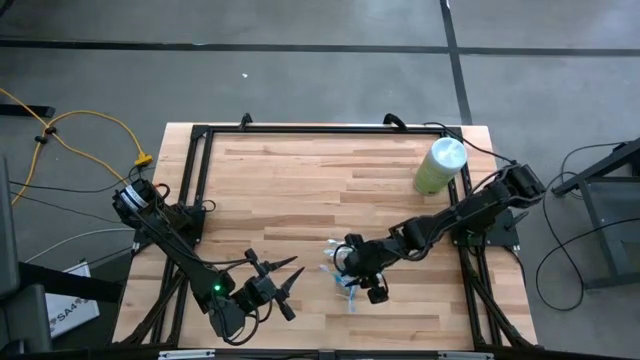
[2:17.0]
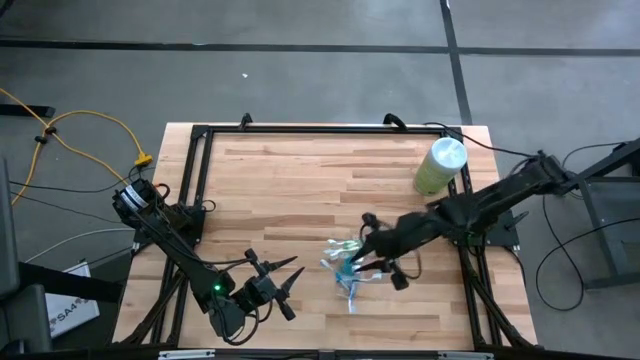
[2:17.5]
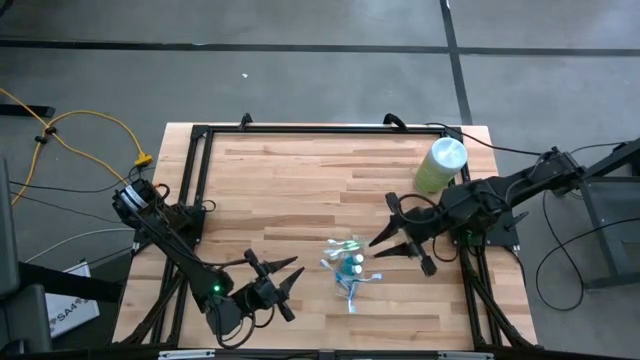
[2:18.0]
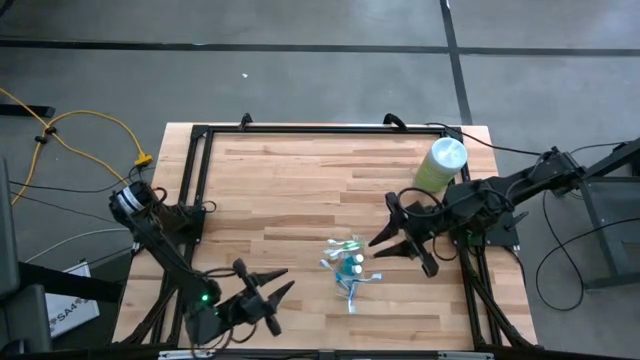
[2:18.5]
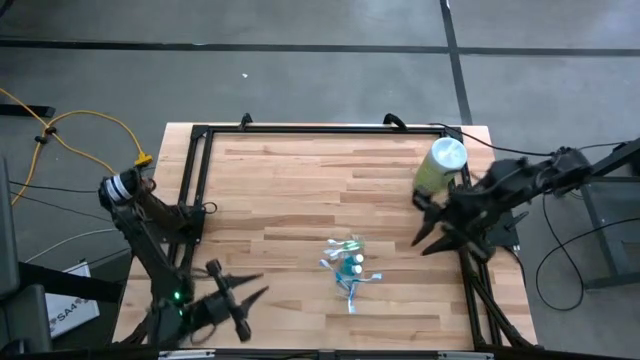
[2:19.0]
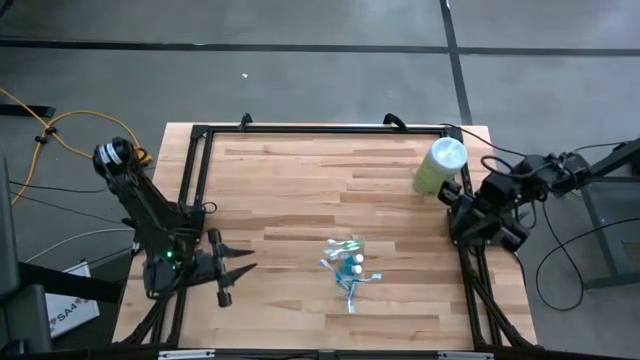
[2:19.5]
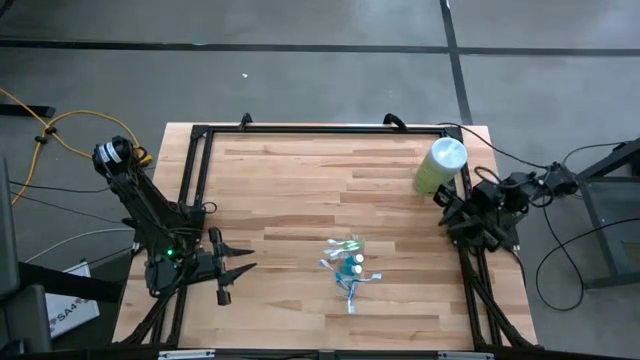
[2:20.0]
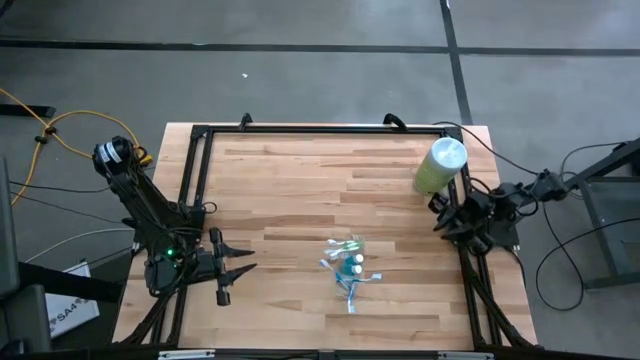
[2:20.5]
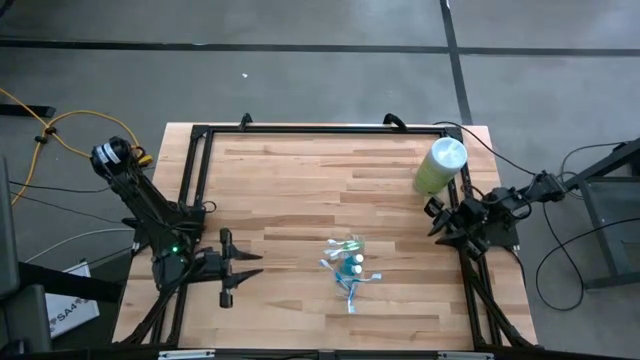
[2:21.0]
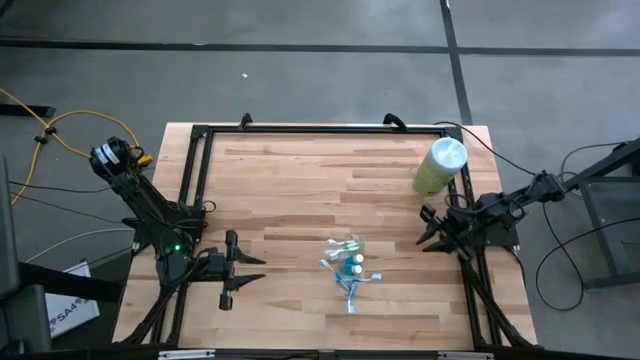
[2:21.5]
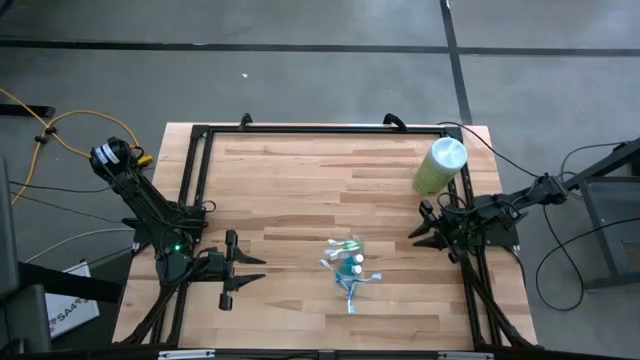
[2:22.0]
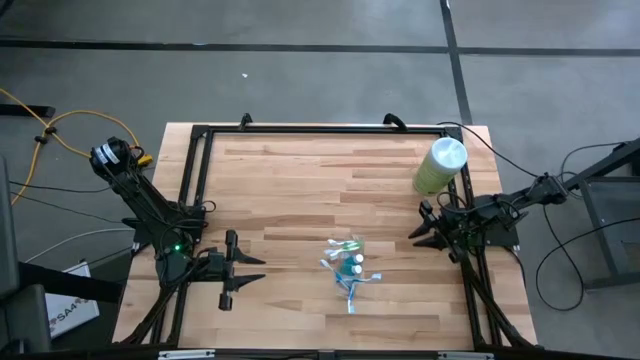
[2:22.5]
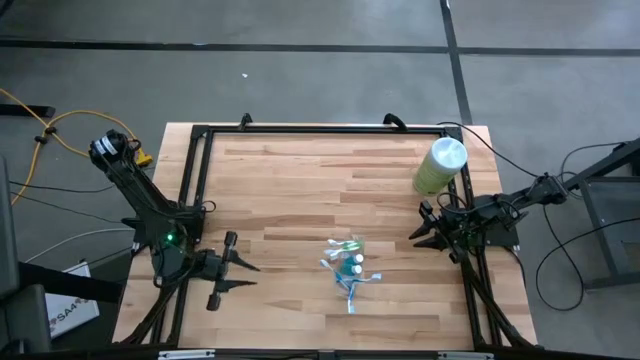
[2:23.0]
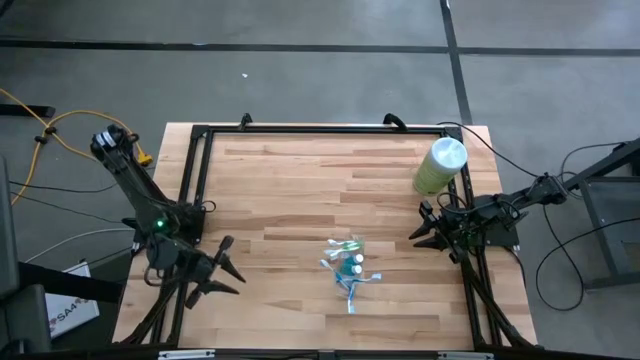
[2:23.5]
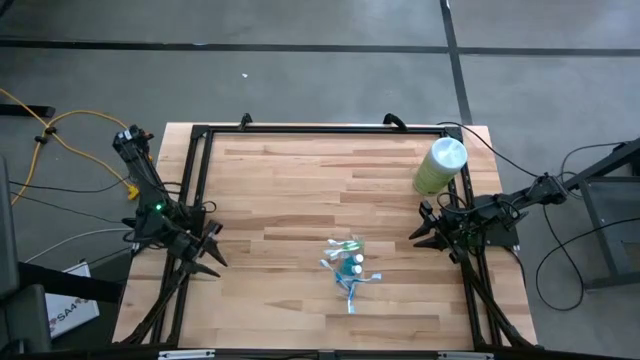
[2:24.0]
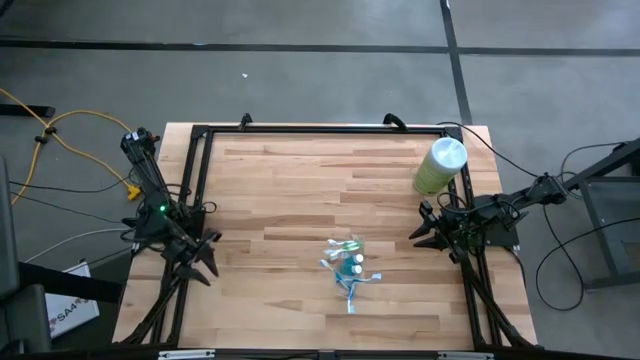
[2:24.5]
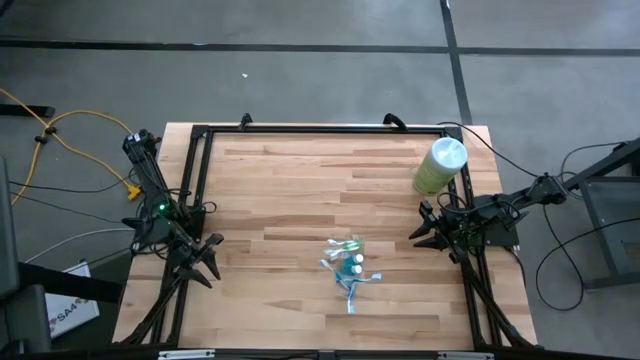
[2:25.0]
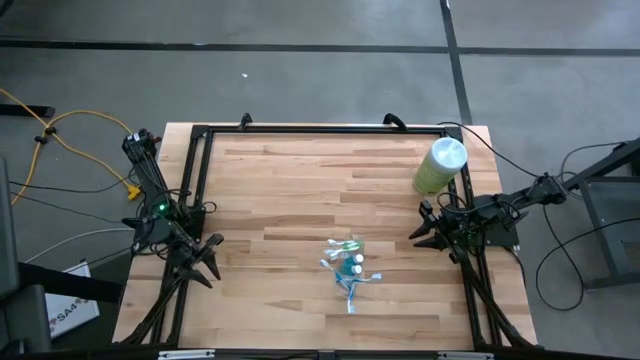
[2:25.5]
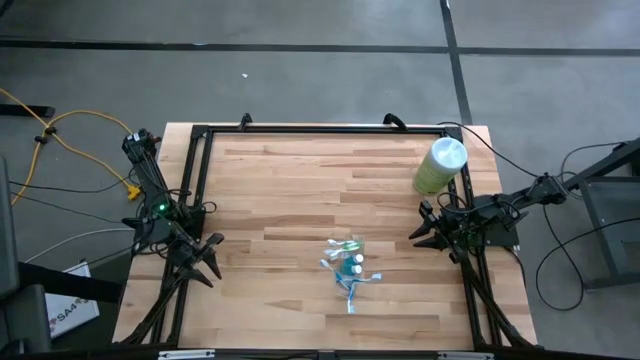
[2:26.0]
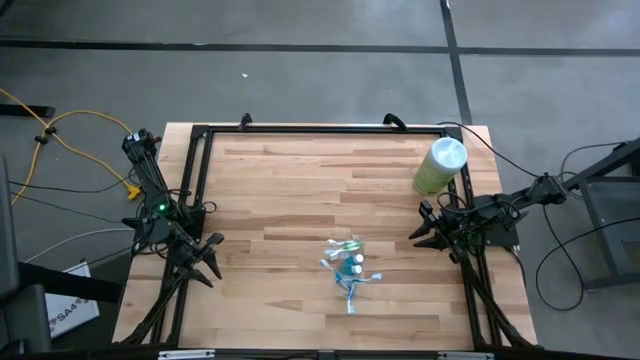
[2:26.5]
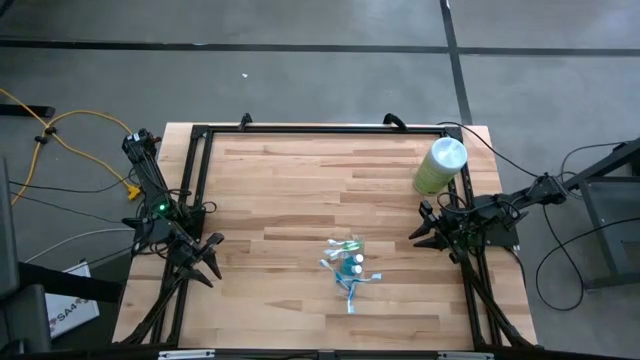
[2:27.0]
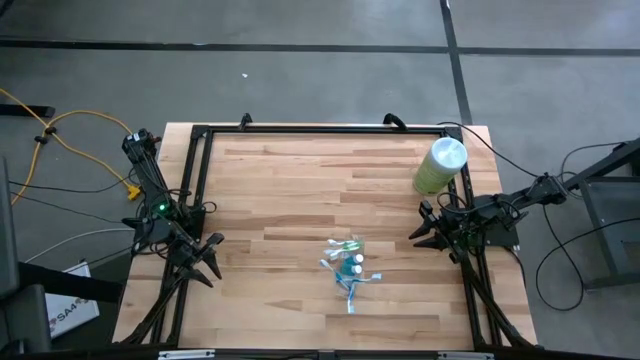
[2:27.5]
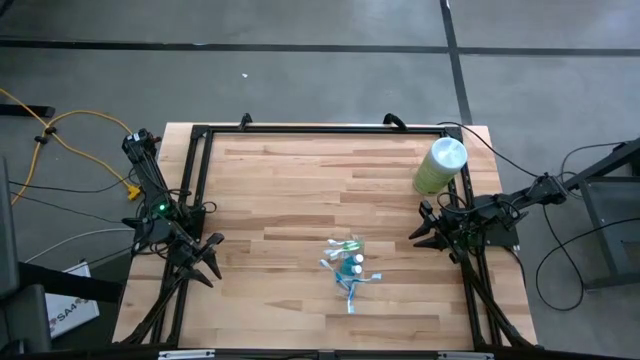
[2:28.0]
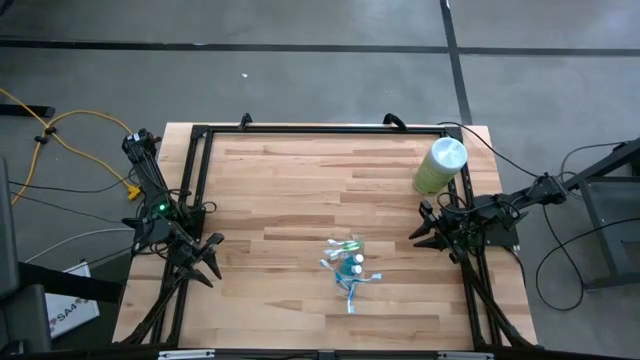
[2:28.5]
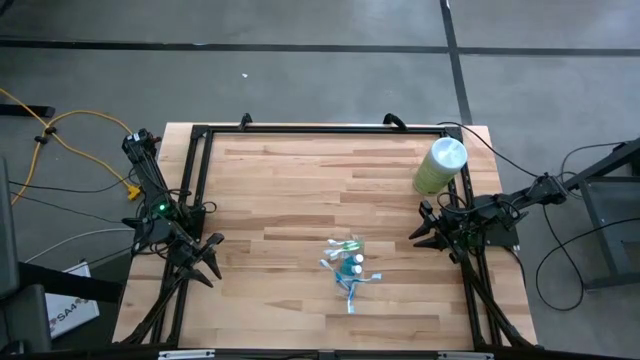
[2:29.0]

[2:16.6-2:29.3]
Task: Pick & Place toothbrushing station
Return to Home Position
